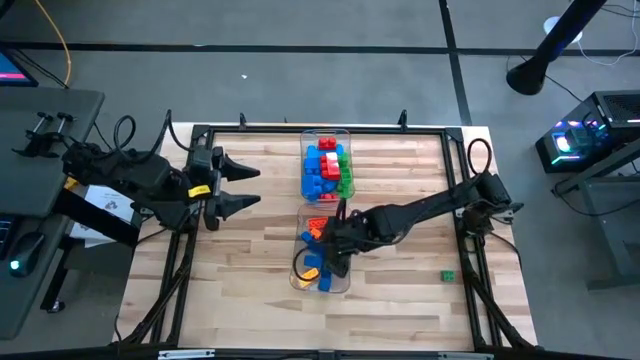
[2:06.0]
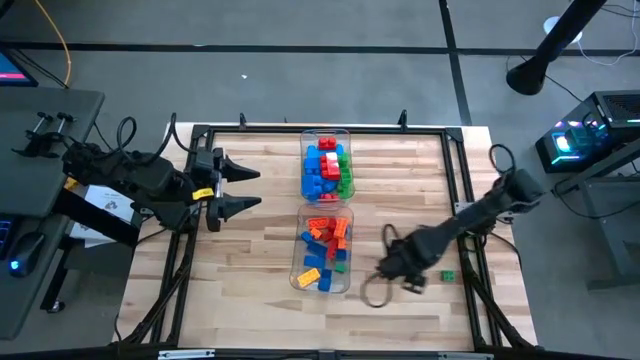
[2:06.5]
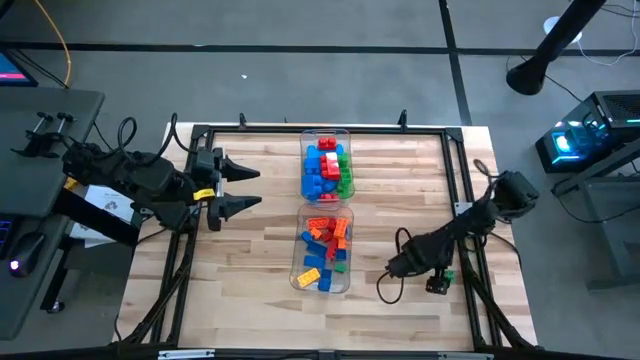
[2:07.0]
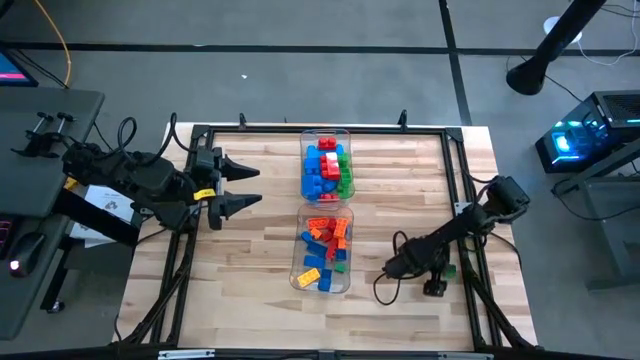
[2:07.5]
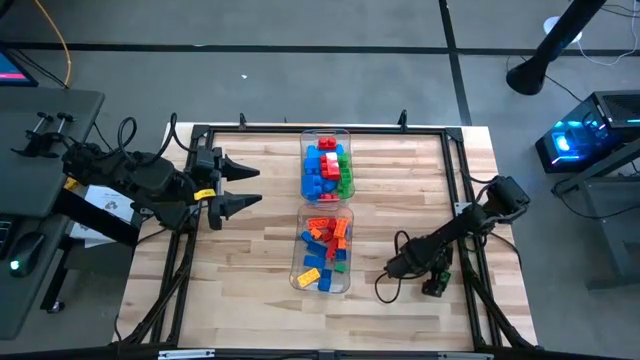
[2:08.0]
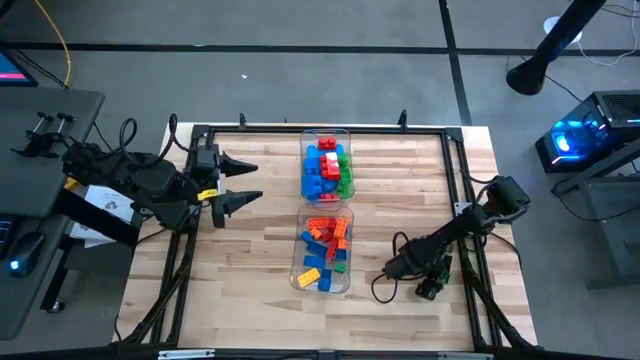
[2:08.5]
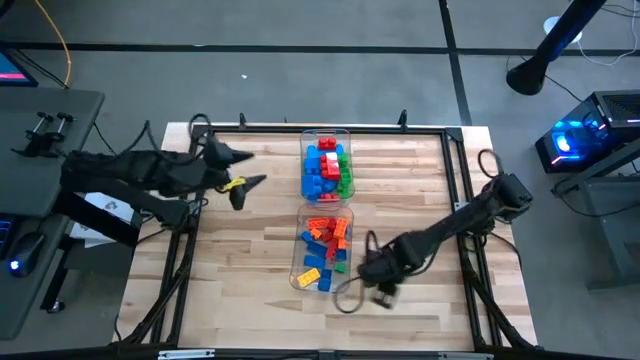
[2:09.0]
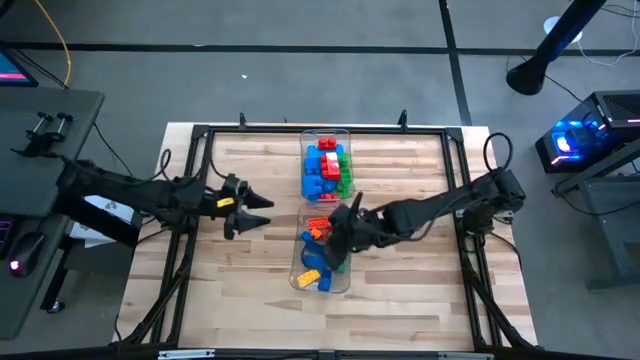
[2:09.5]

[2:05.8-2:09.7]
Task: Sort blocks by size
Put the small green game piece into the bottom transparent bin

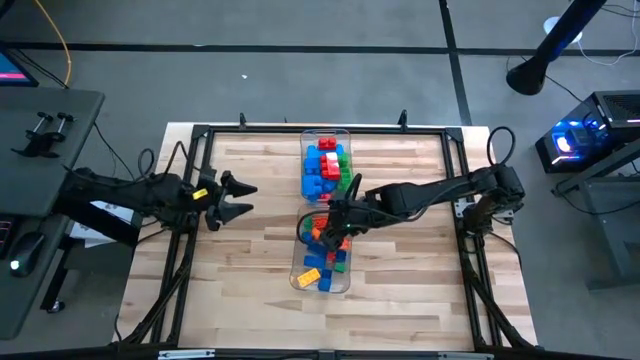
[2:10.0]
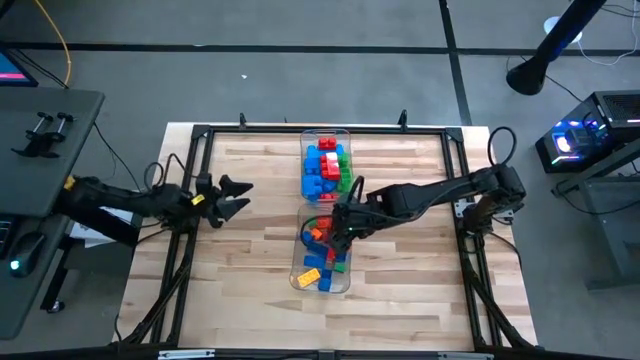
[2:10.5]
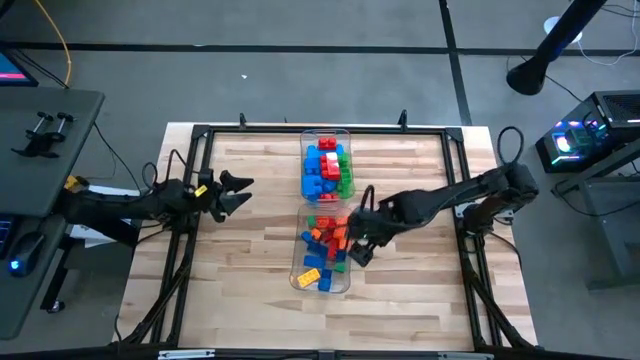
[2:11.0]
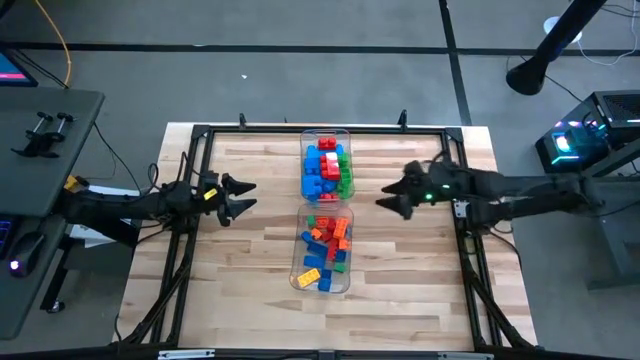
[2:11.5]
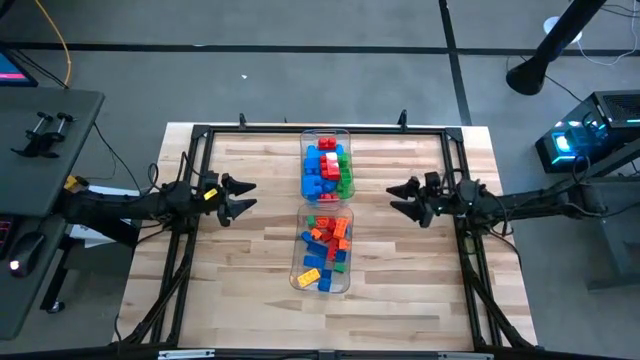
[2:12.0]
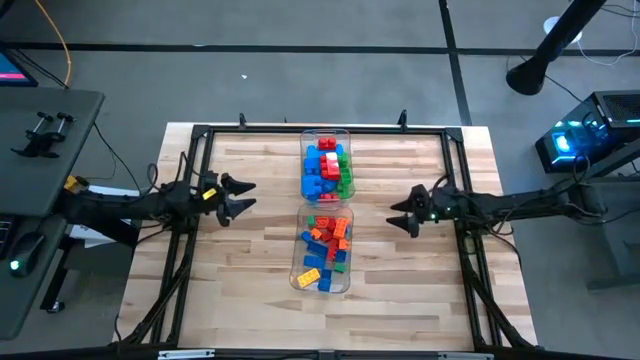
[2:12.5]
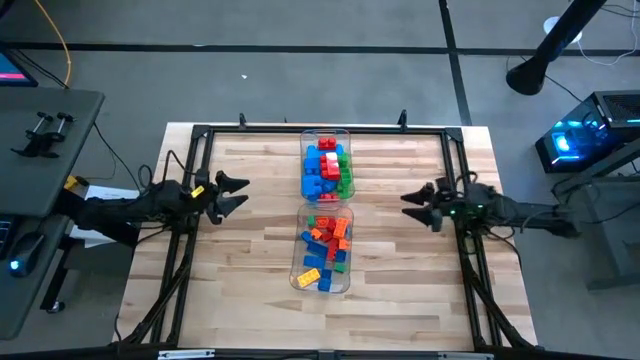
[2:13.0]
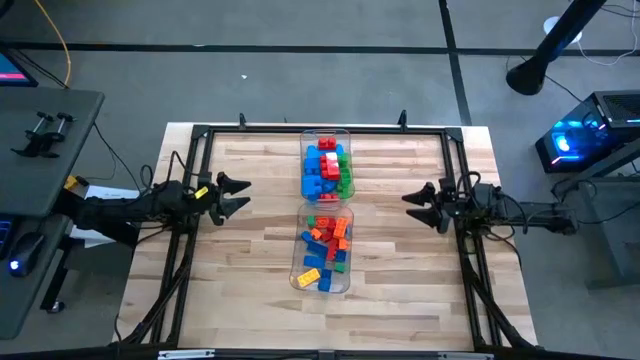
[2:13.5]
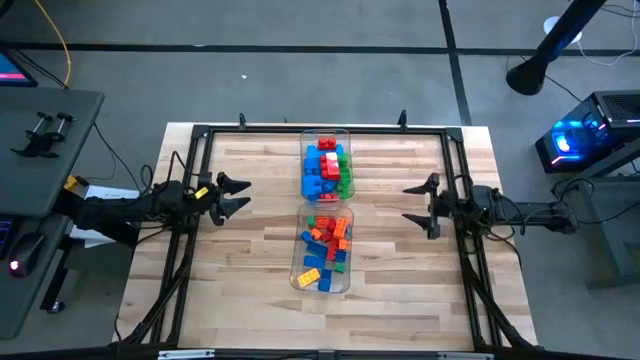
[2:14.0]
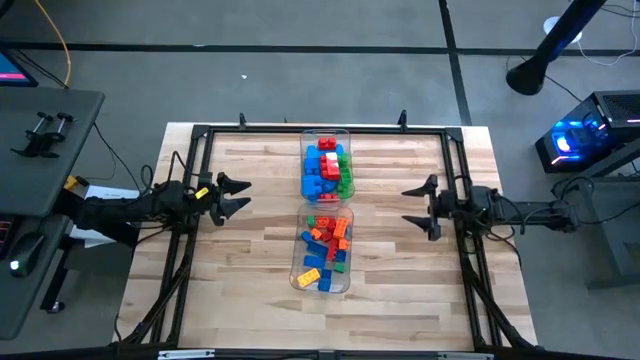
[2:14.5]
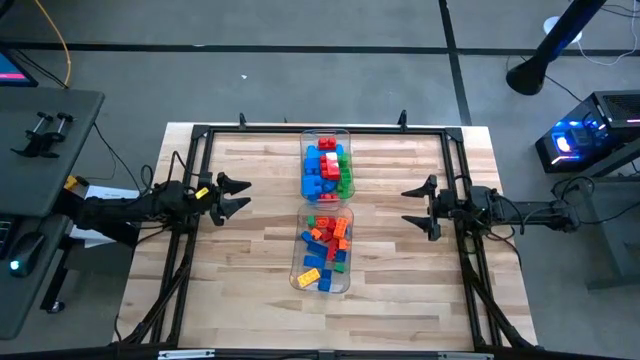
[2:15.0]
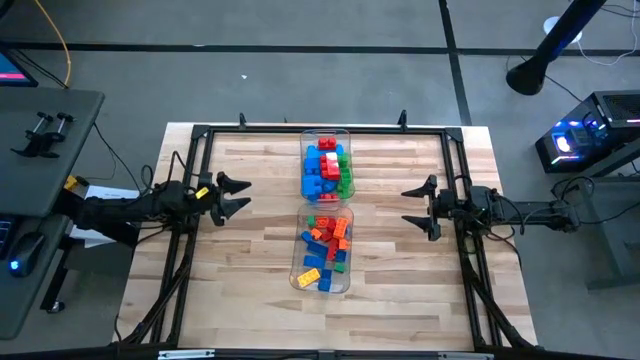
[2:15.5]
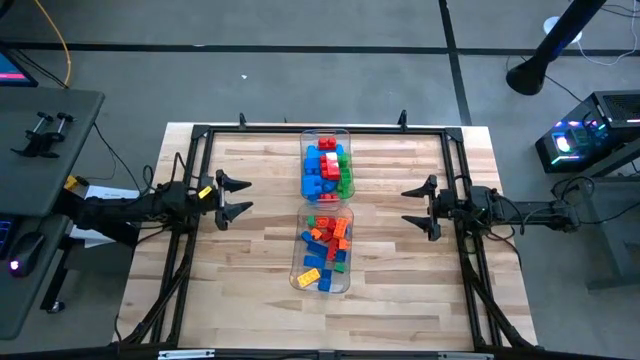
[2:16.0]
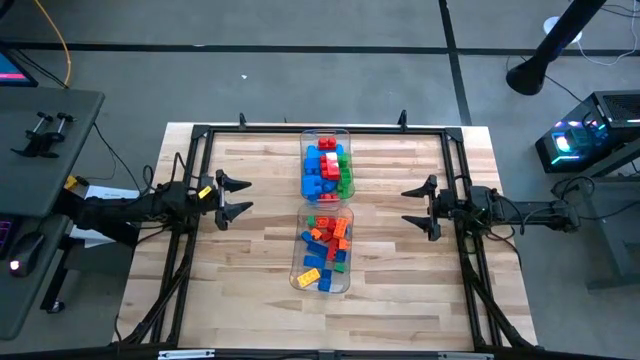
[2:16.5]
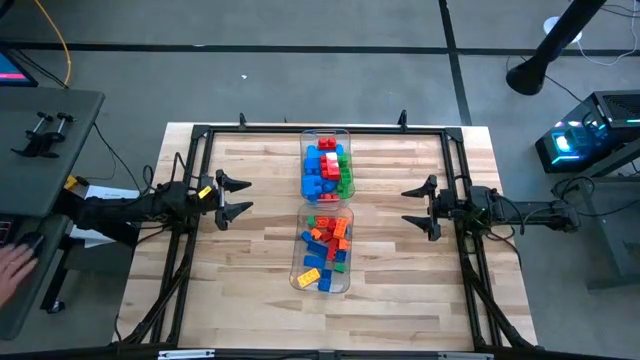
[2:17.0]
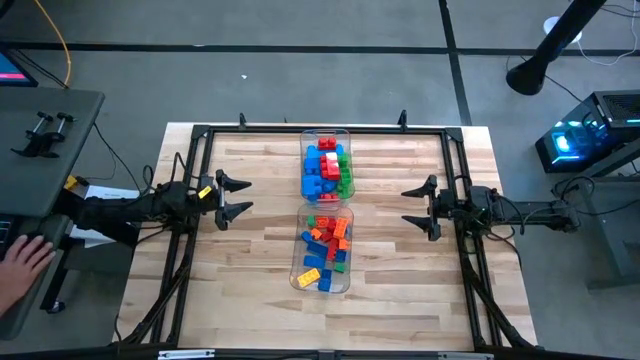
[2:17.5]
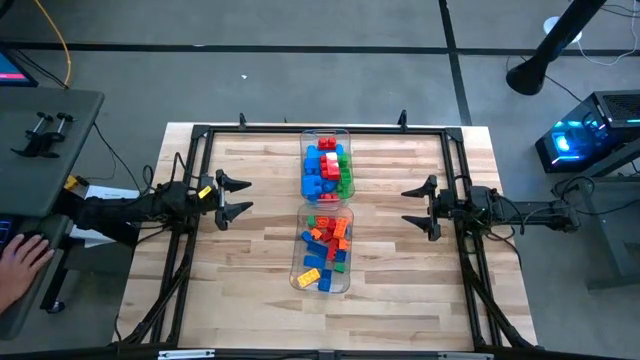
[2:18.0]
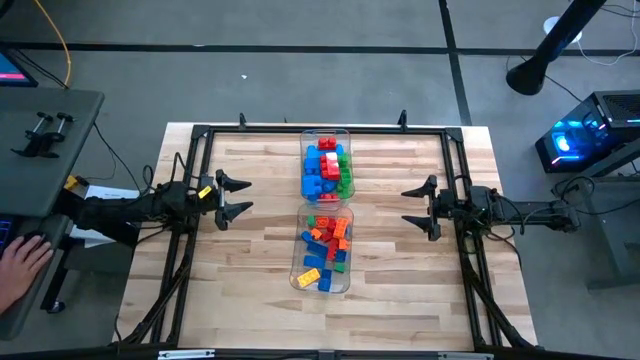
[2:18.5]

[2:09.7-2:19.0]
Return to Home Position

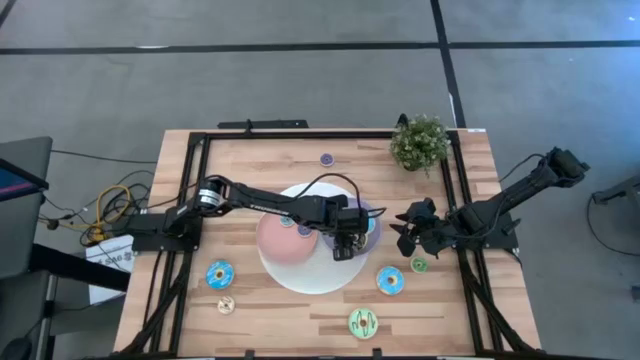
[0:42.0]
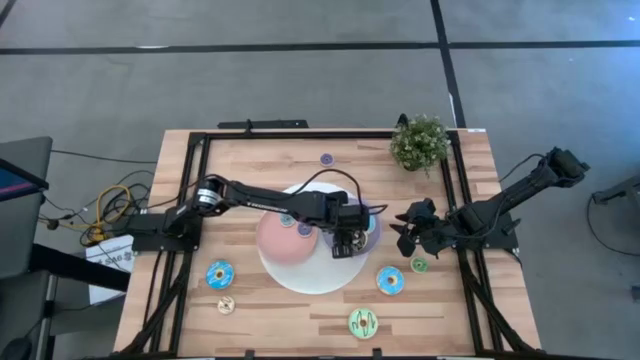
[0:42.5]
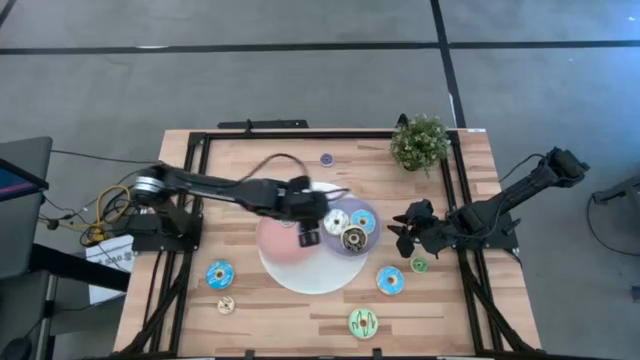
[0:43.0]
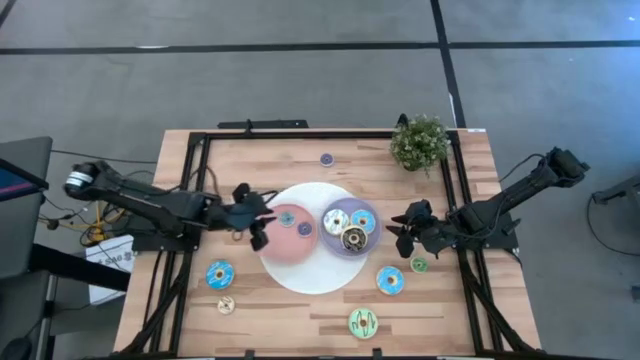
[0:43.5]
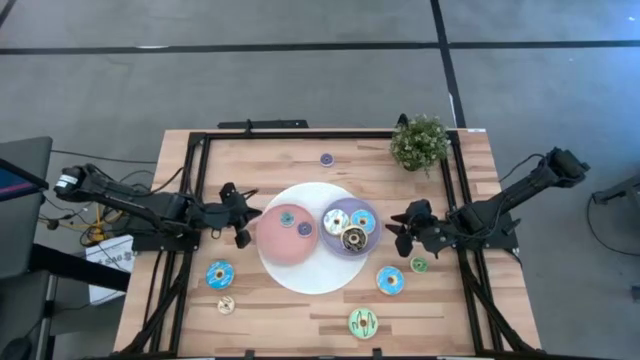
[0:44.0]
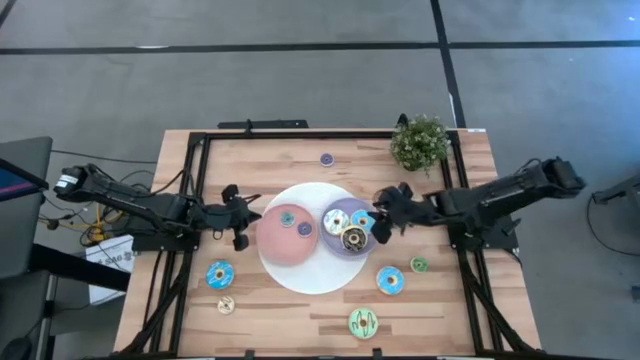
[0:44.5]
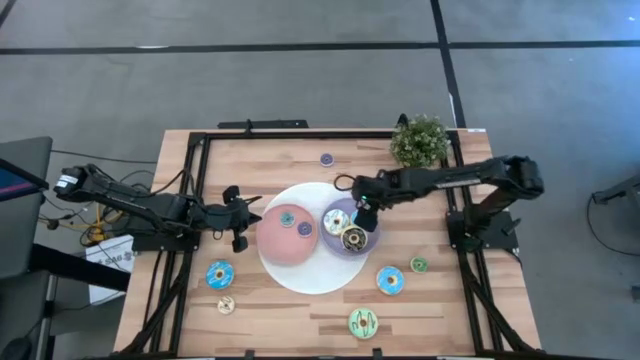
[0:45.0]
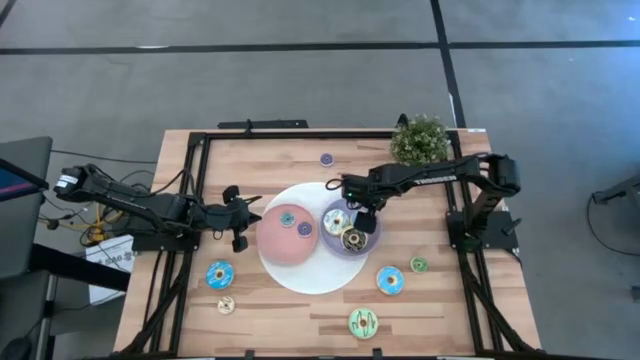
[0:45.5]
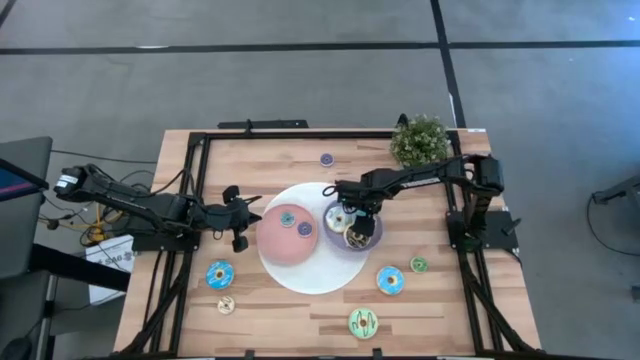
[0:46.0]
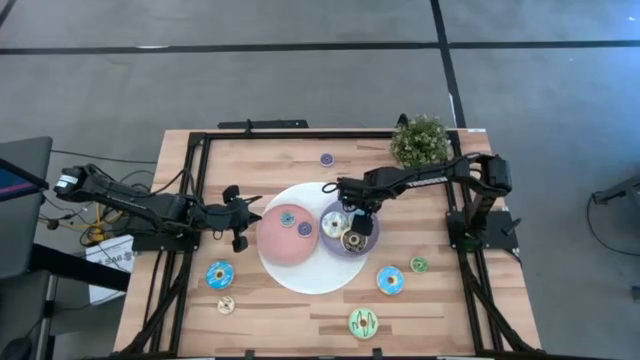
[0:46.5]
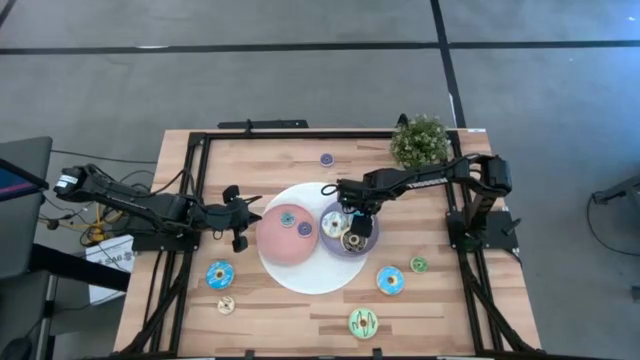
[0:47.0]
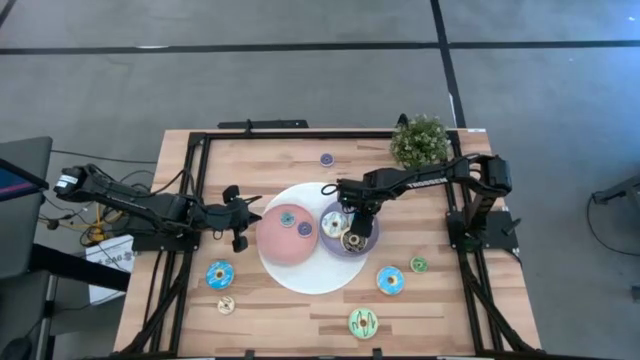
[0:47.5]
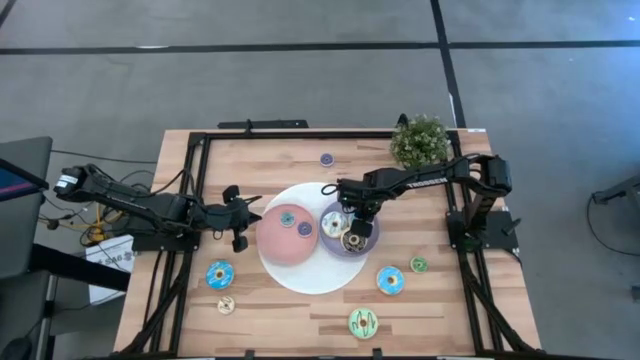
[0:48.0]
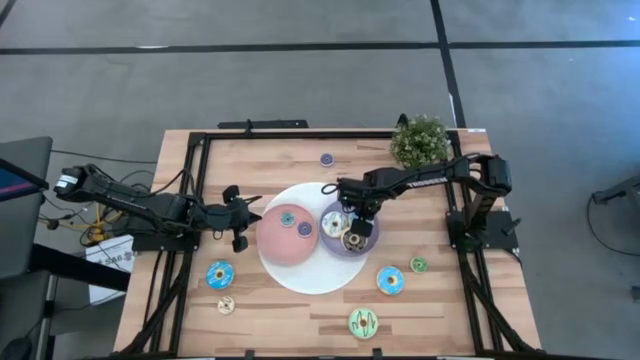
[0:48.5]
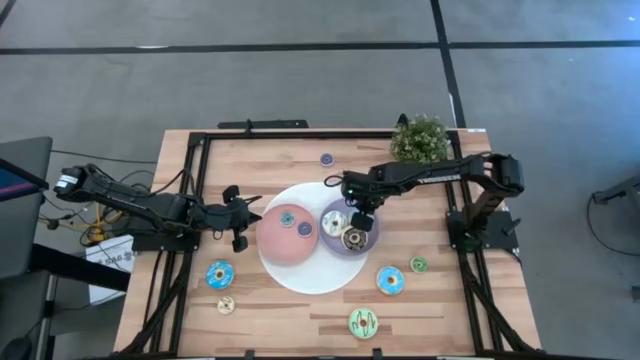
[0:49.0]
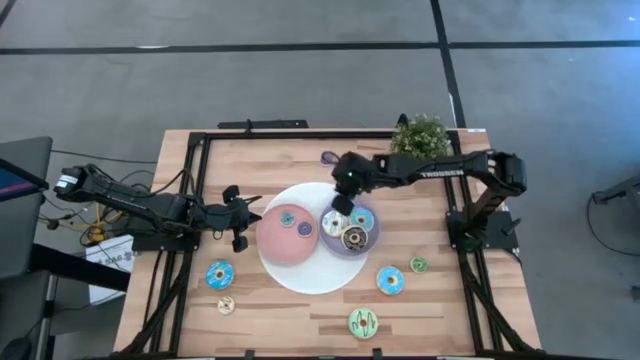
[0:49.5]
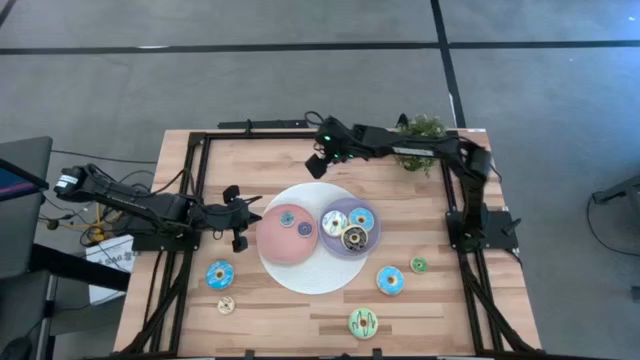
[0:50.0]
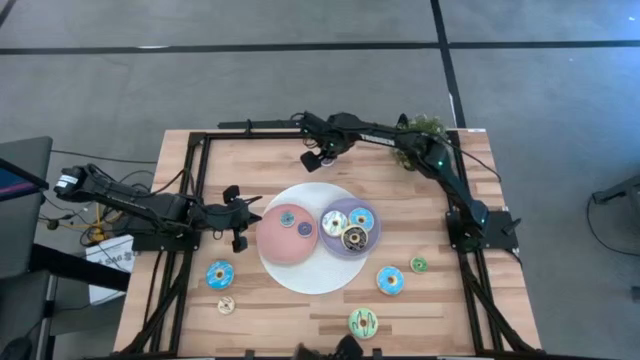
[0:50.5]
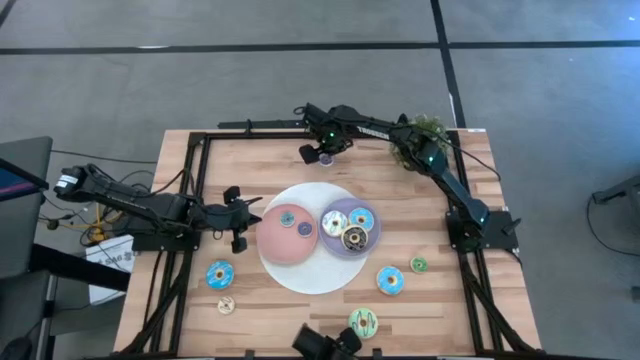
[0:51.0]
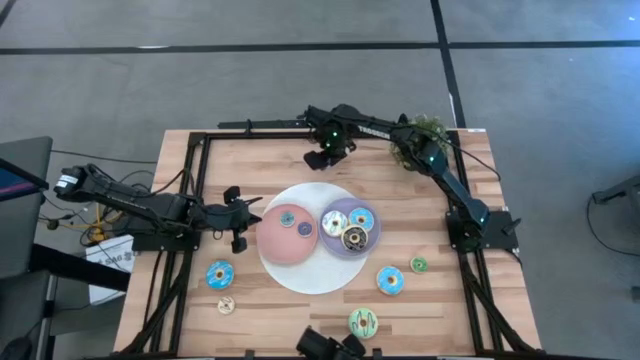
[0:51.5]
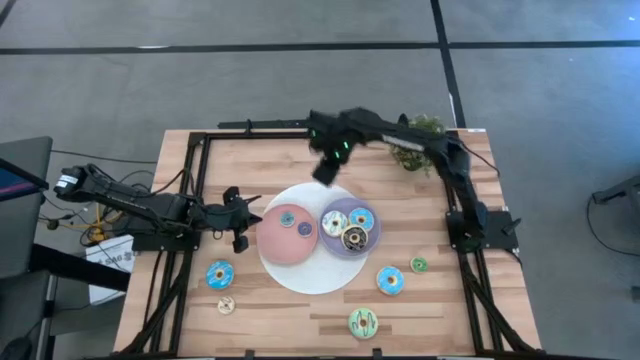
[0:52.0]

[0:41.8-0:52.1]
Task: Pick & Place donuts
Put the small violet donut on the pink plate
